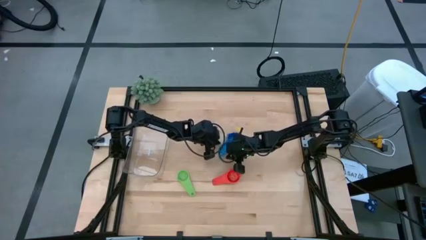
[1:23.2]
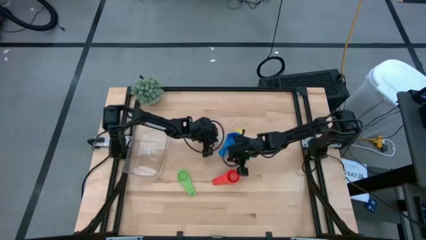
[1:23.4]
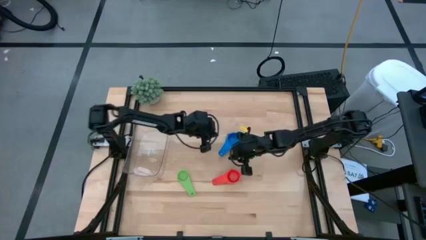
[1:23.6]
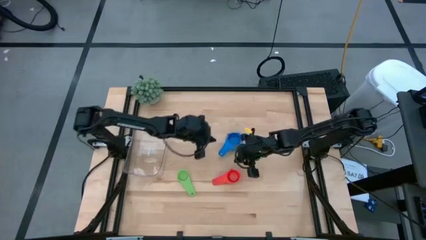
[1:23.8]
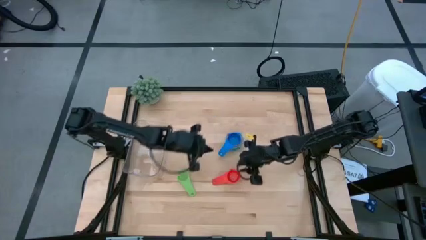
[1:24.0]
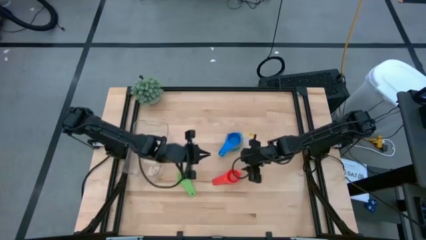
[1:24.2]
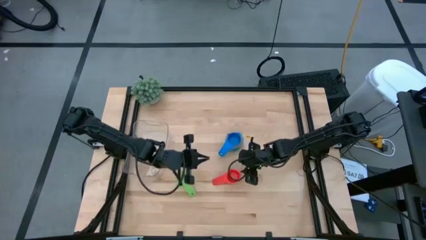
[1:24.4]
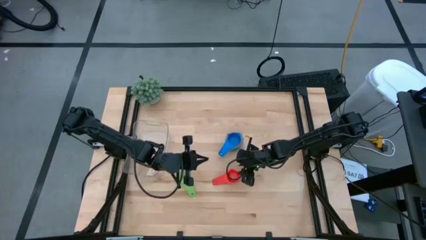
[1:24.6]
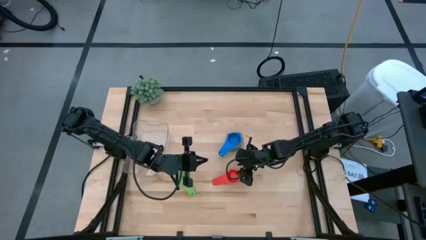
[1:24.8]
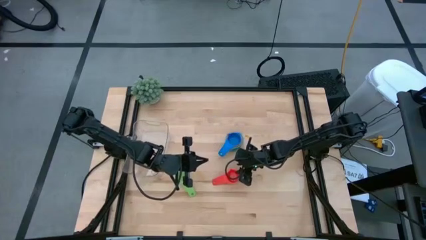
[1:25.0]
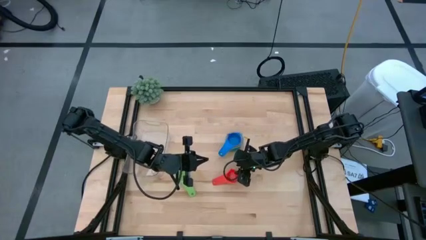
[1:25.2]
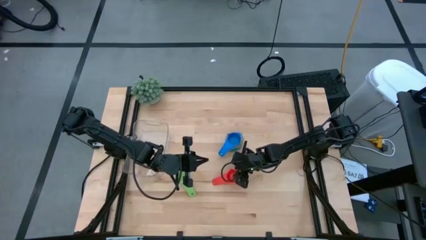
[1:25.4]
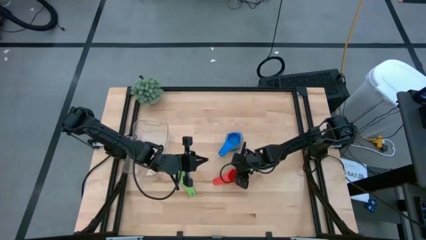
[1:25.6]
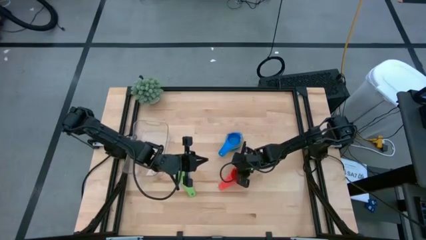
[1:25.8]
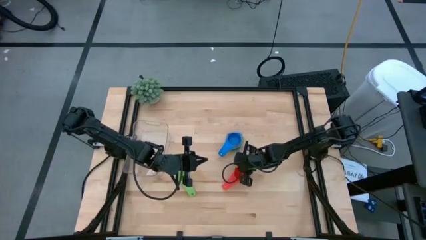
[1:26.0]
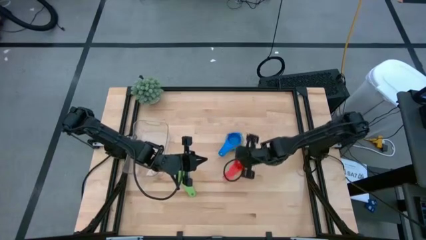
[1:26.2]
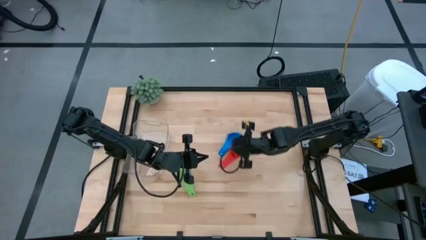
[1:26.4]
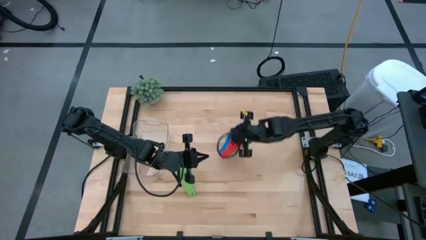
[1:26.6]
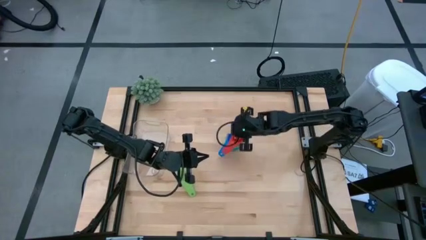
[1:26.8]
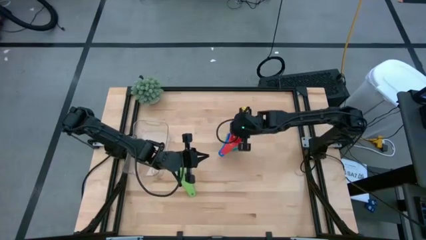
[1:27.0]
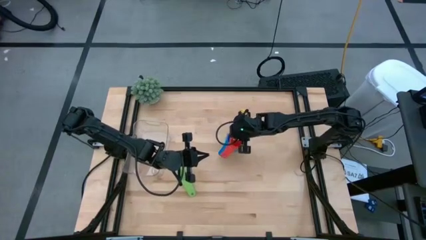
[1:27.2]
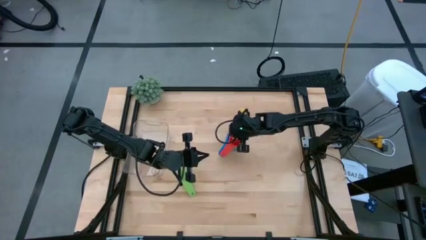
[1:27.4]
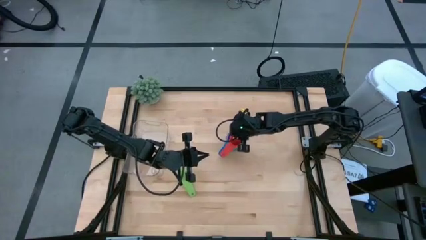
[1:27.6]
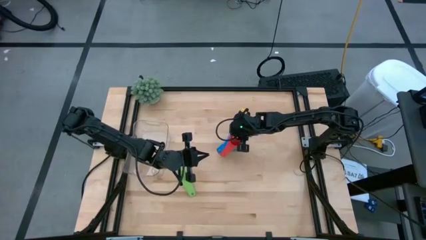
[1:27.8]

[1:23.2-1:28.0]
Task: Nest measuring cups in basket
Stack the red measuring cup on top of the blue measuring cup

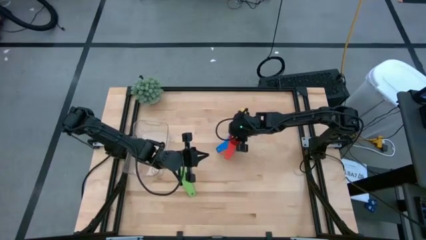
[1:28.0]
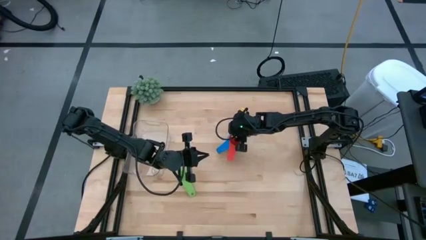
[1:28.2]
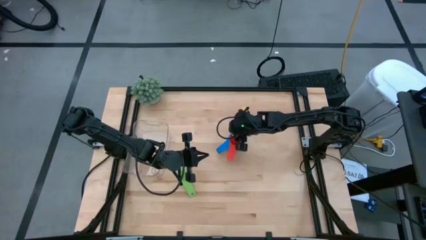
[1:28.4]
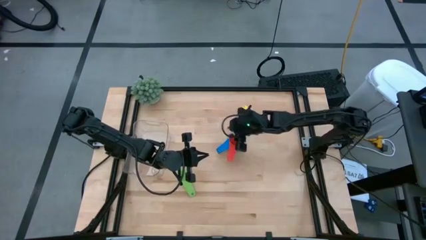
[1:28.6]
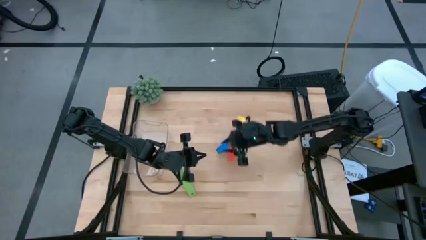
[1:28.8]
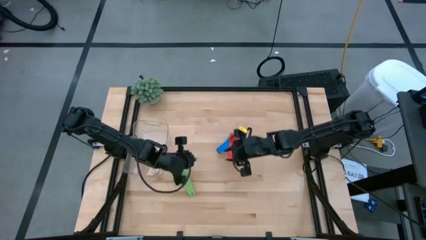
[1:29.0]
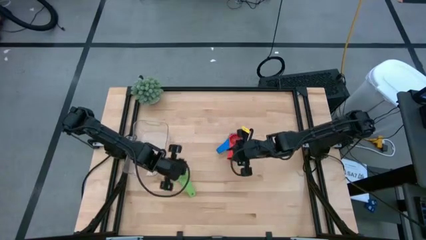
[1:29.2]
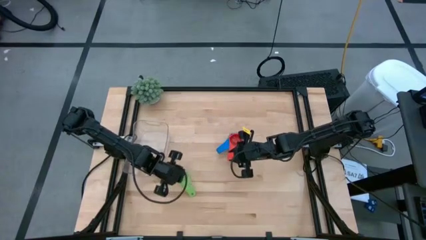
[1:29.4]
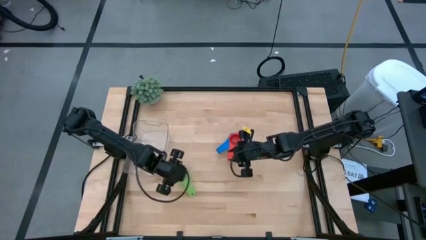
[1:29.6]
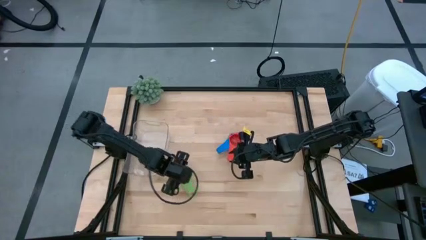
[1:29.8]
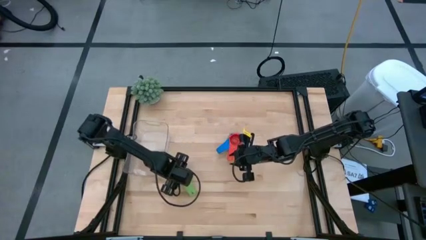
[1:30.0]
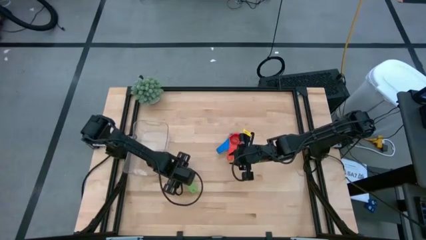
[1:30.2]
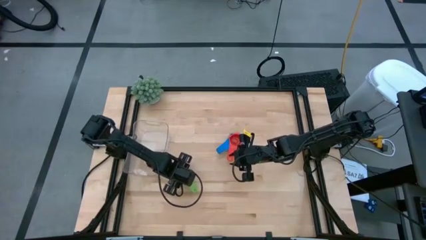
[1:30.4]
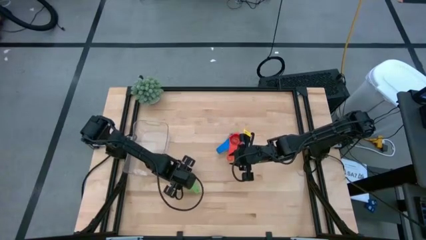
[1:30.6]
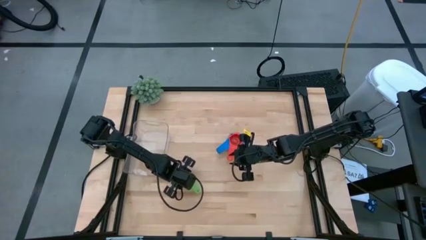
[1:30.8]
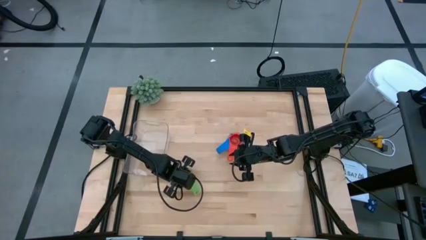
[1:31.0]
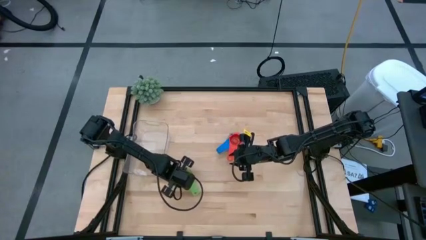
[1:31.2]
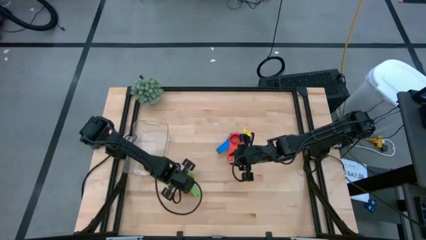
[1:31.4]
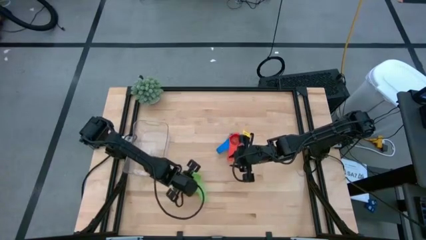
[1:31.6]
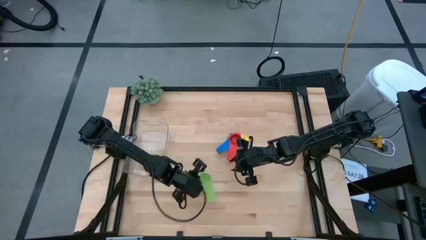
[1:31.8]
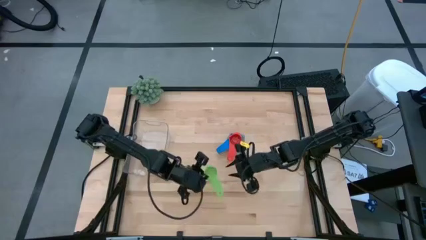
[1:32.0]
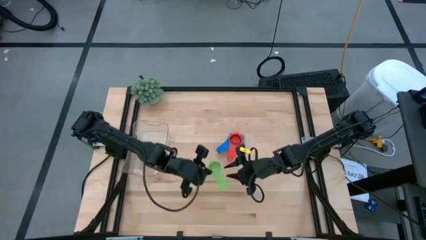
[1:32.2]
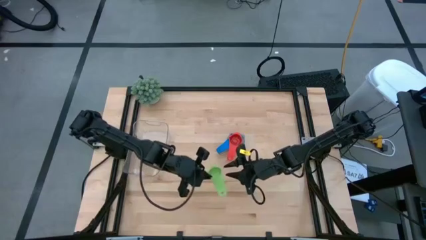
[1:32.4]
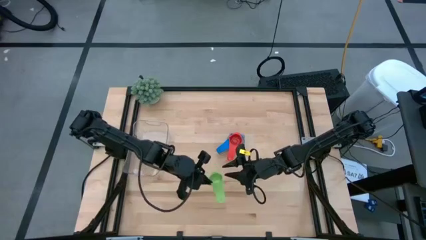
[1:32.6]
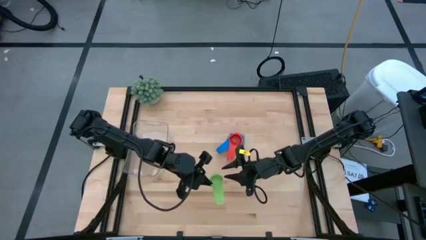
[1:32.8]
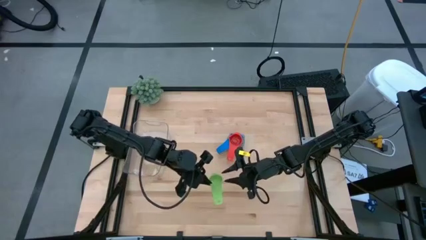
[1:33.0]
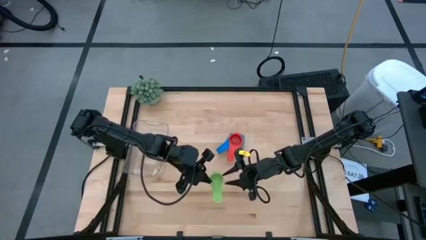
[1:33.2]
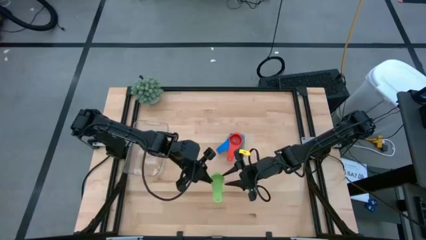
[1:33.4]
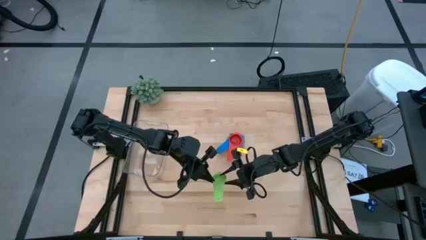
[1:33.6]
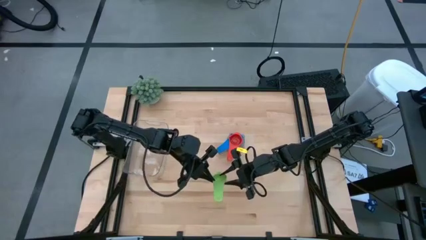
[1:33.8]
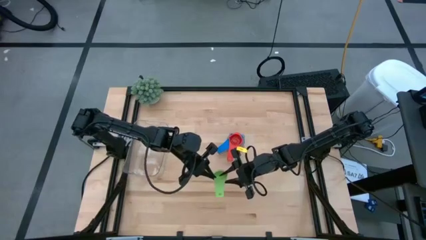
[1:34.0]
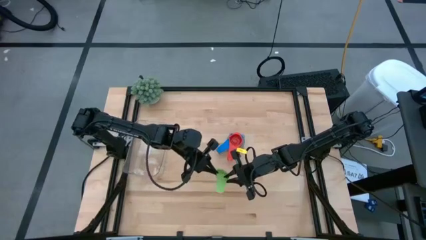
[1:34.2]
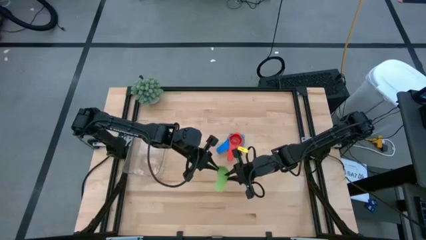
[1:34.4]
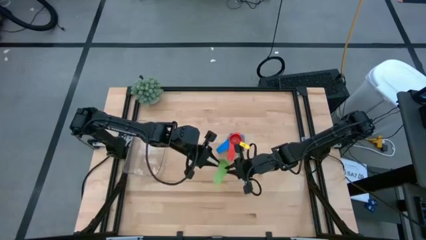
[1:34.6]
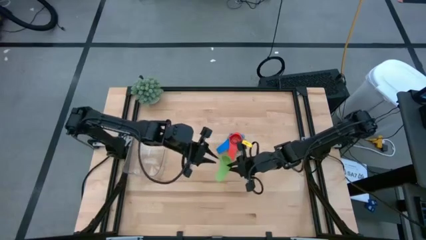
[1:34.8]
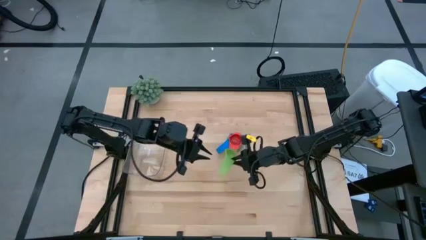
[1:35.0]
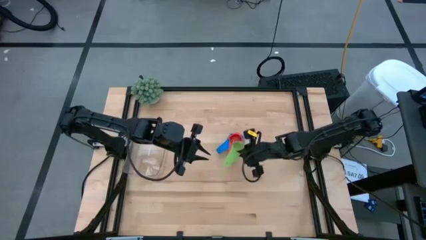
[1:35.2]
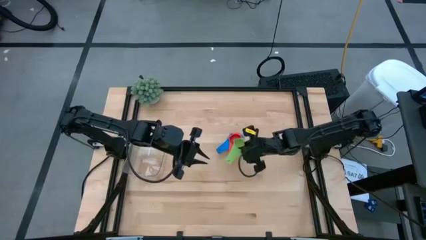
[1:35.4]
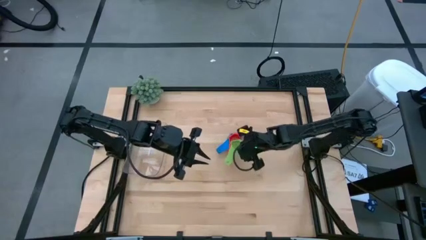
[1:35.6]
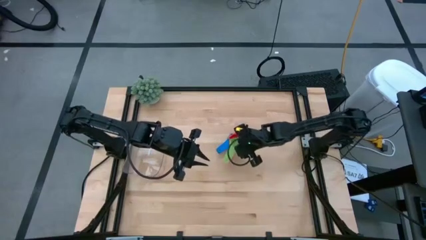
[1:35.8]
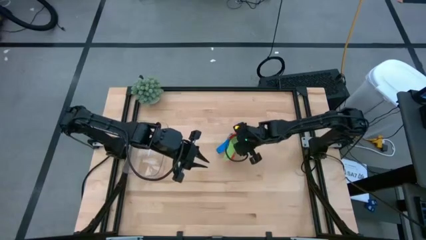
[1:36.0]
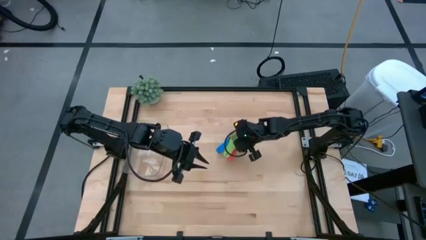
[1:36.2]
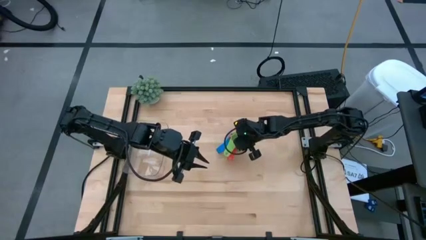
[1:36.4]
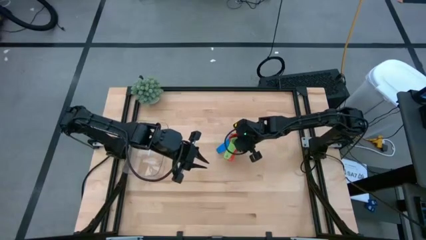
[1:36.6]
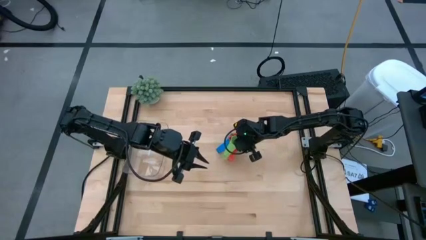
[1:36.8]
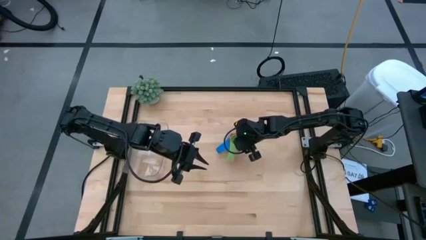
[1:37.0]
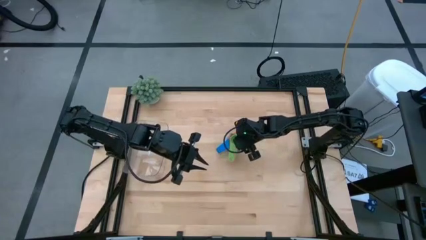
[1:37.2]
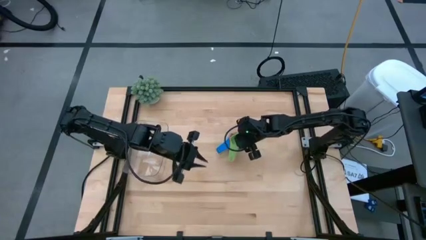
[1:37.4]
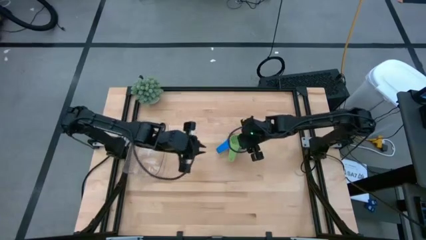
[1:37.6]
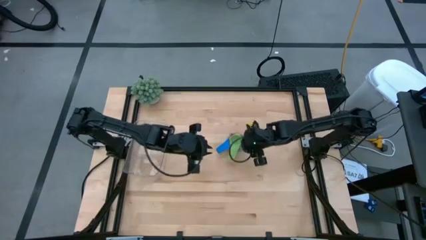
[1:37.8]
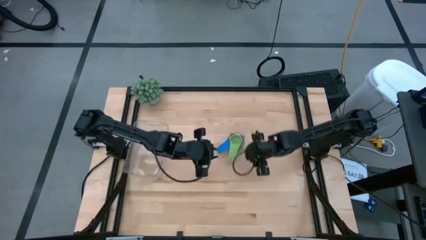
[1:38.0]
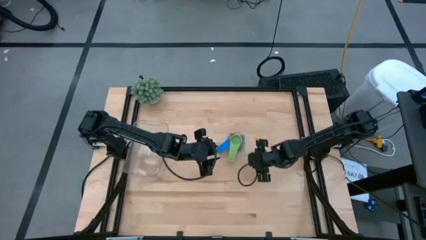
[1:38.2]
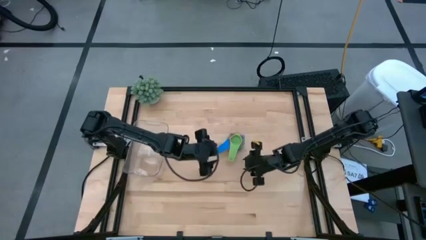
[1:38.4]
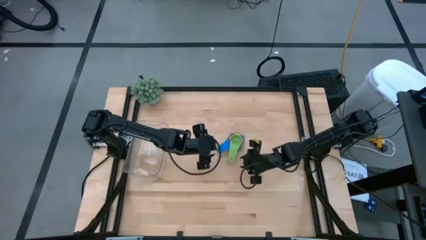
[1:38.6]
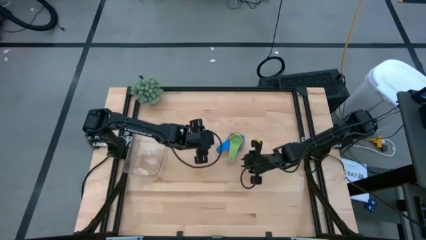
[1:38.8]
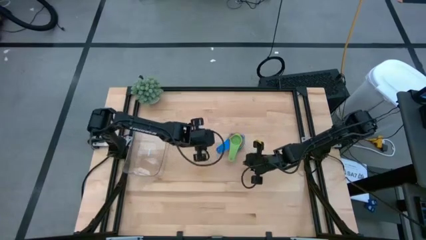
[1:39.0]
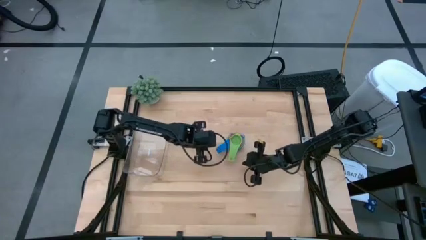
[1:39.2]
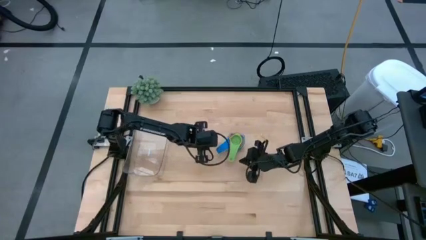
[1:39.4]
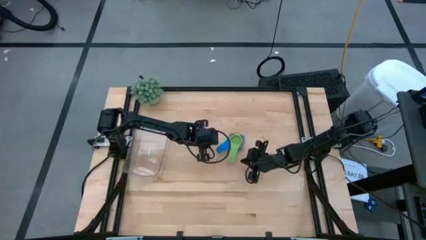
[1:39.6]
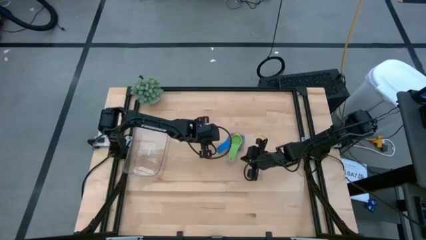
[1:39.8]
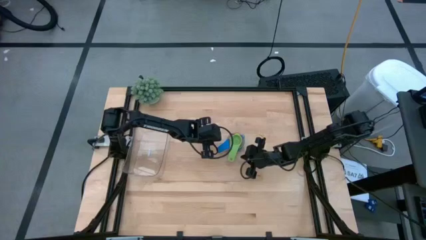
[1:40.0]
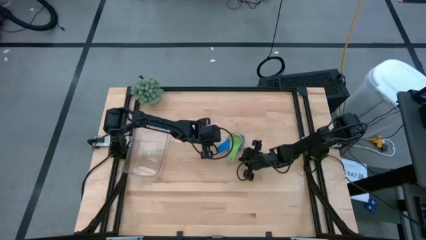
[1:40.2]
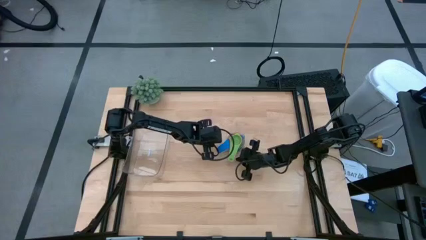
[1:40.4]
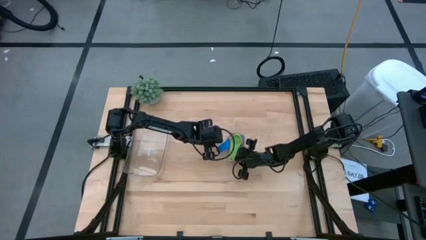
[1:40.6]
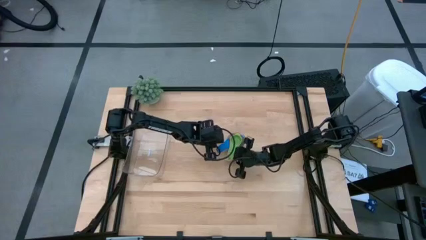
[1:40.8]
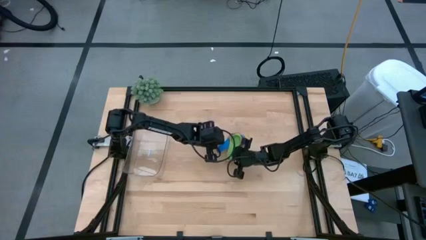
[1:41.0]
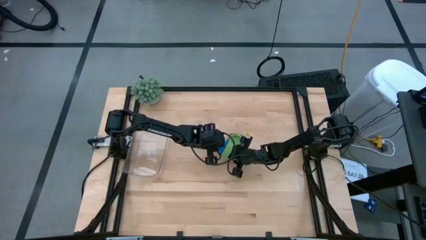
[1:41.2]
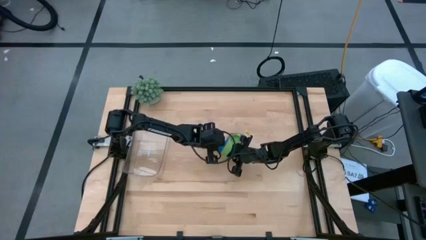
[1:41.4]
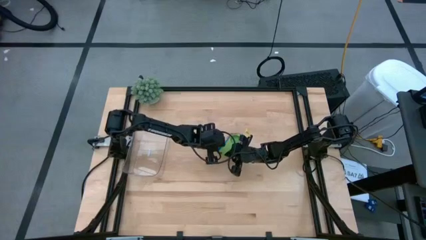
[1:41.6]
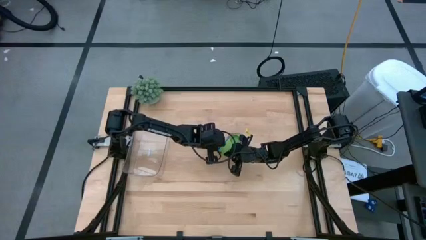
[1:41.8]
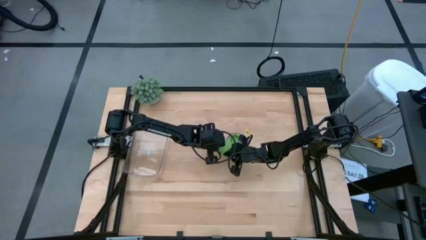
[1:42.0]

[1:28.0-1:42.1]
Stack the green measuring cup on top of the red measuring cup
